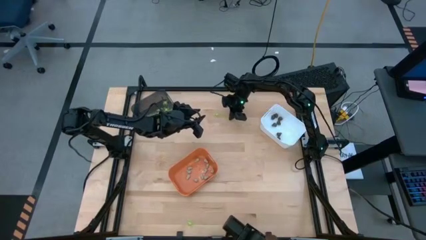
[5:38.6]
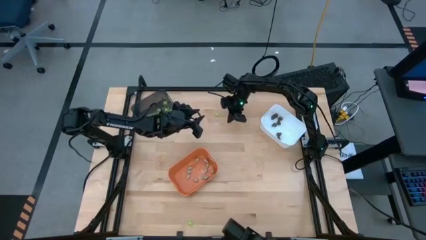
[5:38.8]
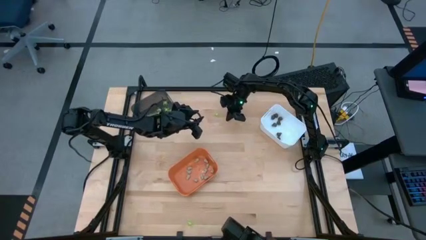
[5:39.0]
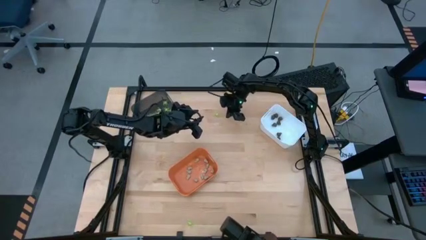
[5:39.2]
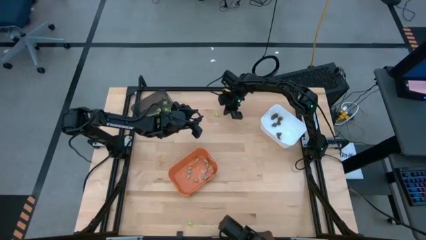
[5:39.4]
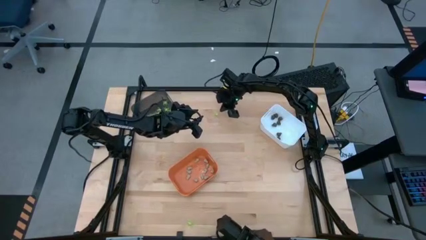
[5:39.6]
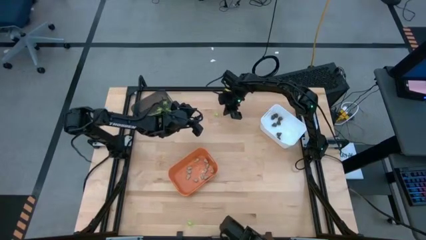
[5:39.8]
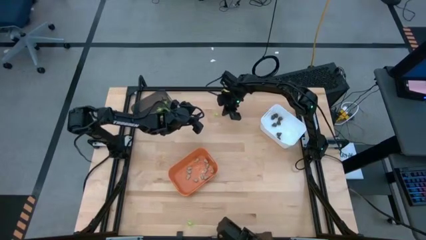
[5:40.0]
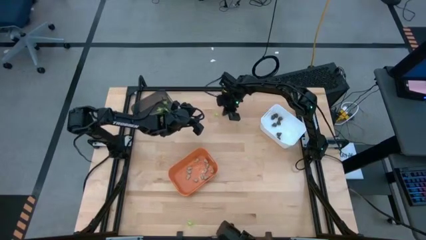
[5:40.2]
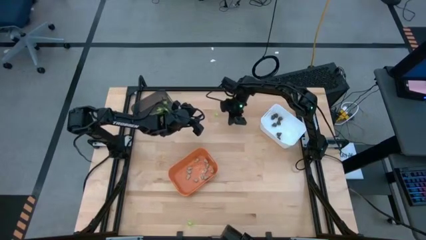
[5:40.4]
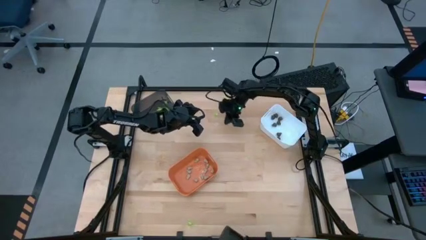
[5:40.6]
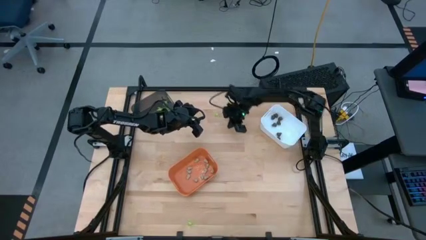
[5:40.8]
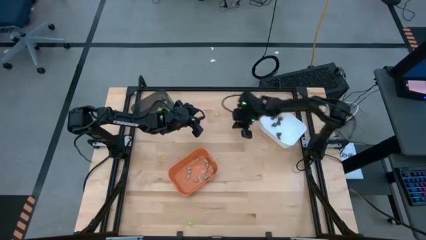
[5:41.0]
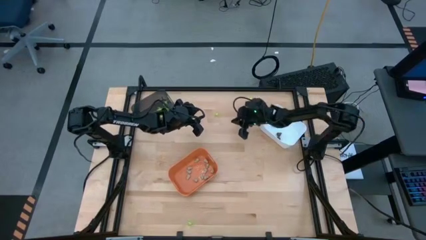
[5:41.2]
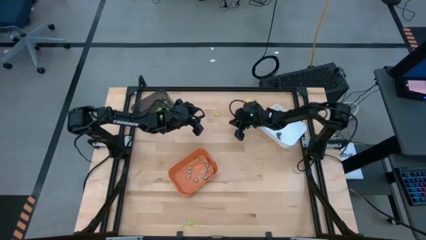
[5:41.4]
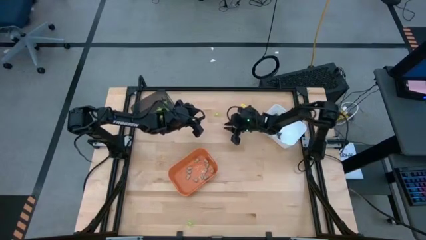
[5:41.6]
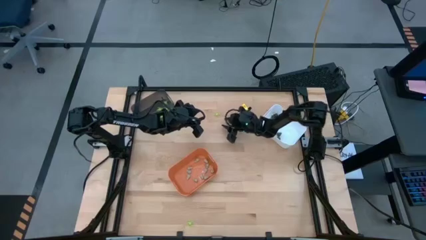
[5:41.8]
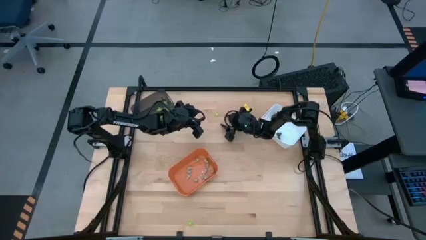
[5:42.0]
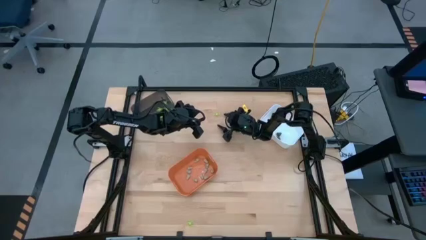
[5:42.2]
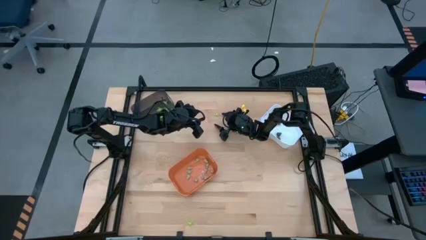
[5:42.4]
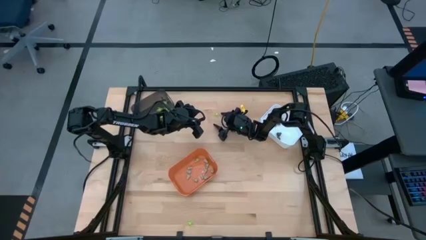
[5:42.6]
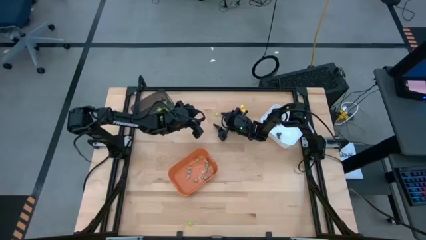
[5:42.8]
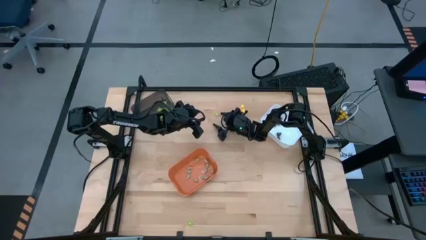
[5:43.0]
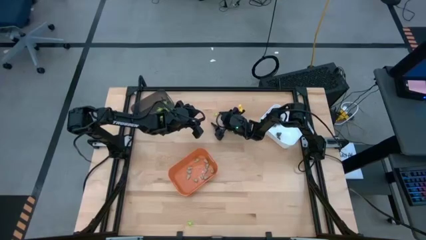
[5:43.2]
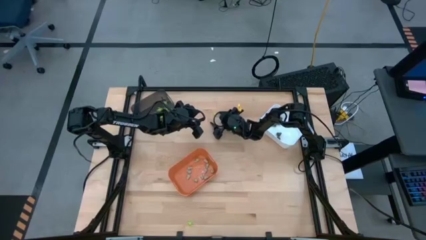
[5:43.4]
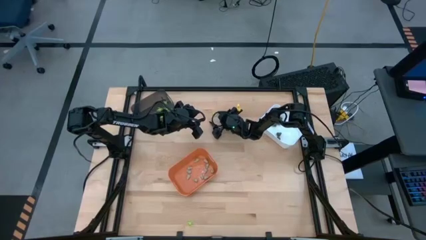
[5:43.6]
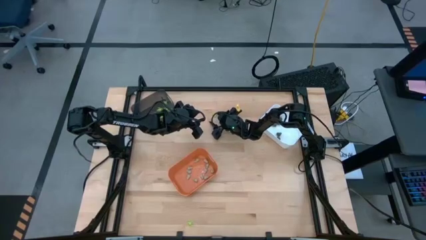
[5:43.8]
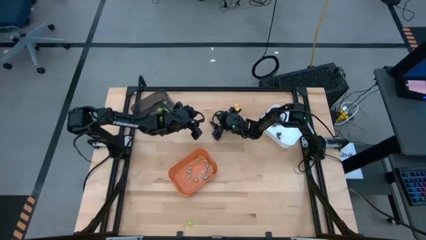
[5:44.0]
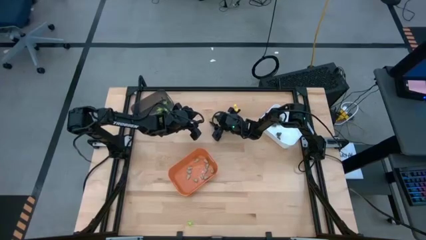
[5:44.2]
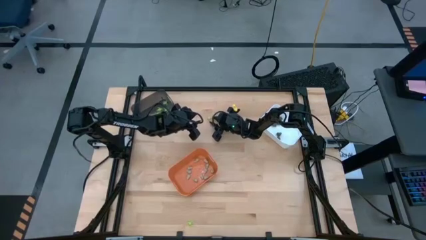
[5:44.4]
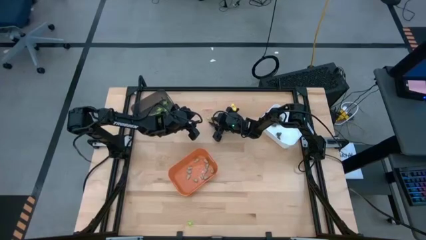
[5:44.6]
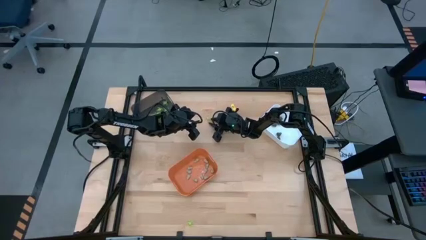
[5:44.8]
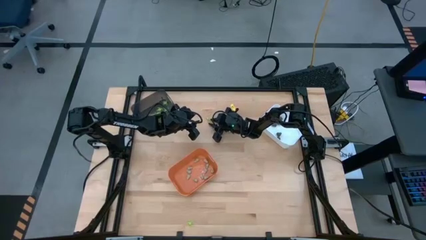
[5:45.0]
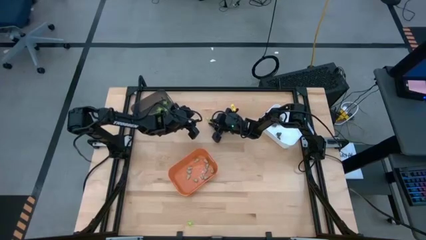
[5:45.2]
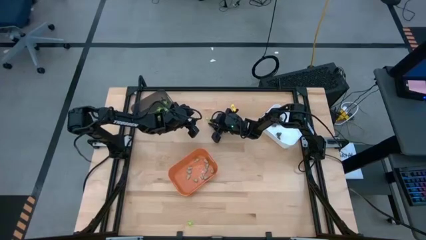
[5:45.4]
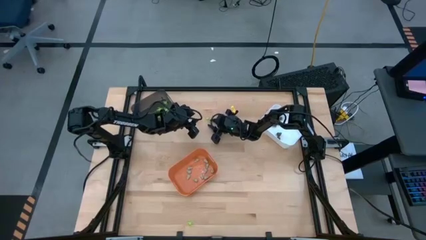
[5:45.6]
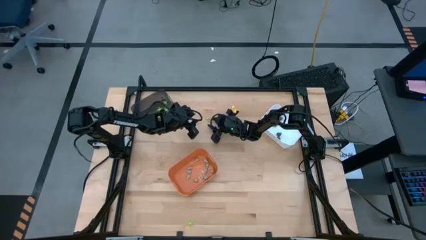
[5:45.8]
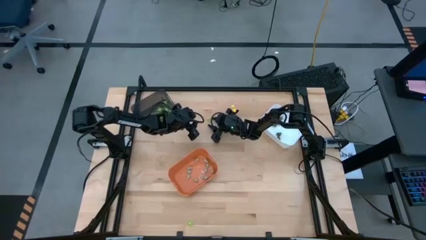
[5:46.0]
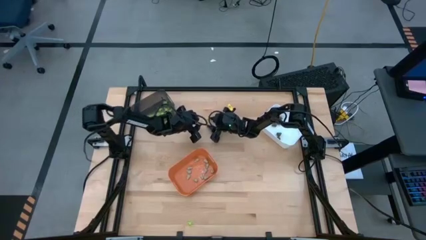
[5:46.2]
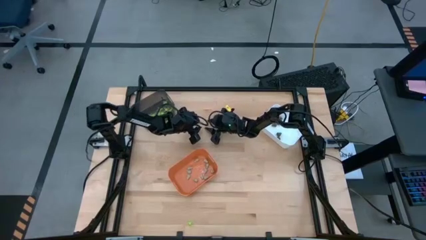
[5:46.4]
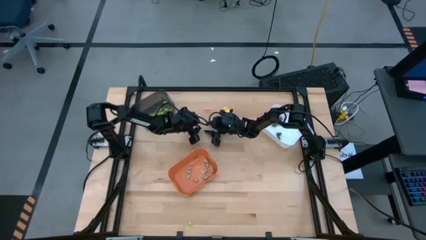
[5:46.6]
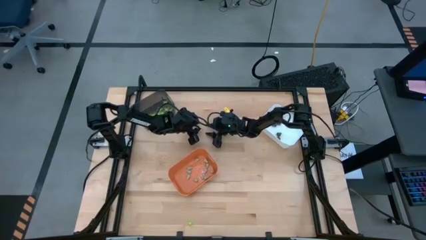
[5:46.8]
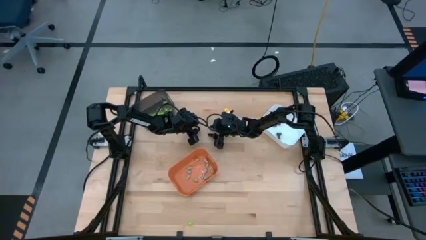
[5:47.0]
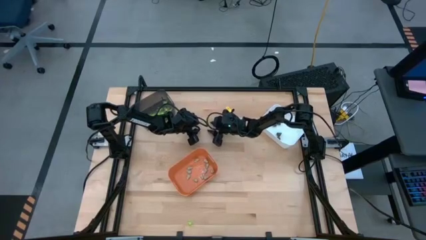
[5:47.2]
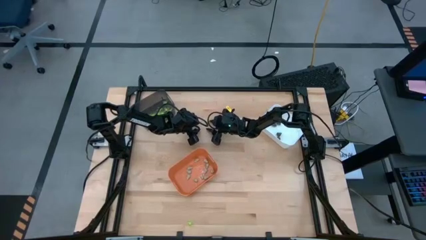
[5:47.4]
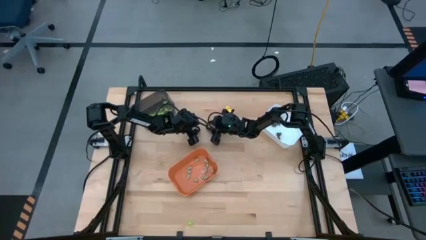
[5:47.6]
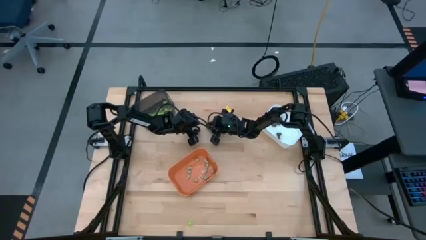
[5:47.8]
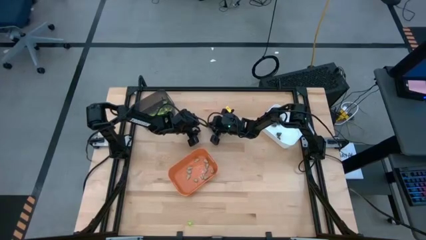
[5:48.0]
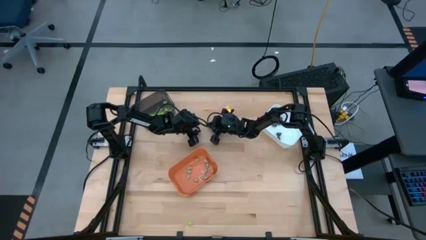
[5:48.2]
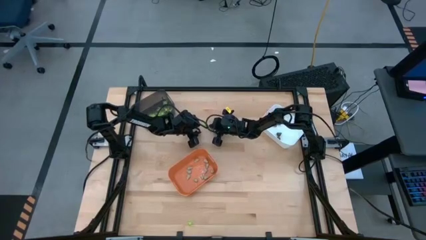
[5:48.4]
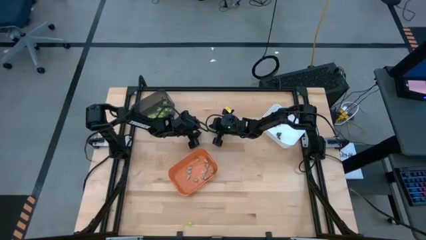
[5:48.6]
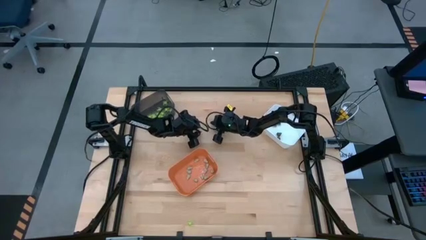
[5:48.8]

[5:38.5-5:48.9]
Task: Sort Halloween decoration
Put the green spider toy into the black bin

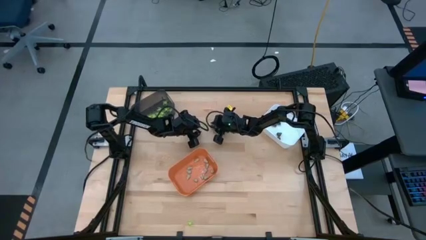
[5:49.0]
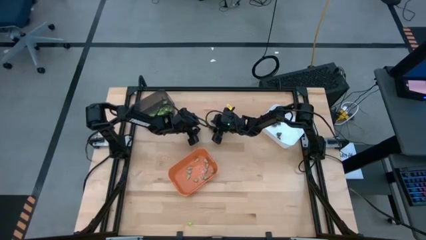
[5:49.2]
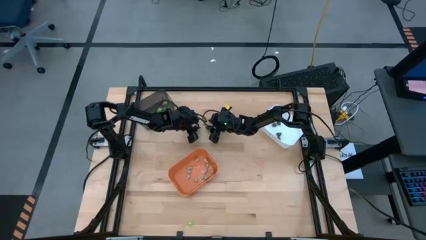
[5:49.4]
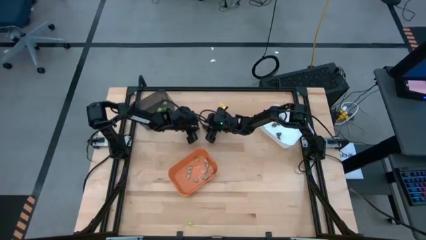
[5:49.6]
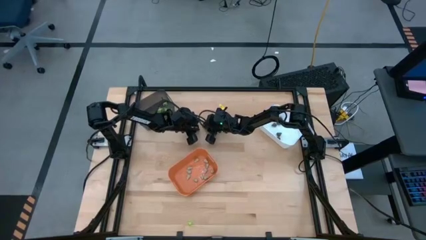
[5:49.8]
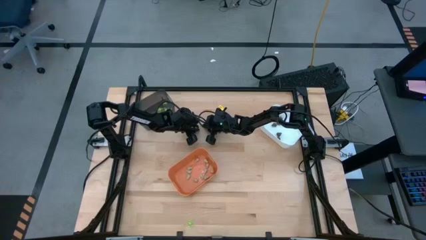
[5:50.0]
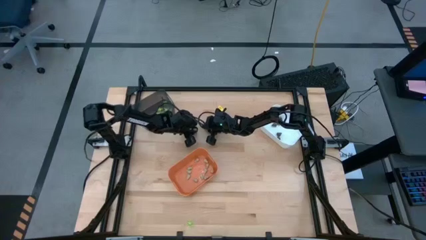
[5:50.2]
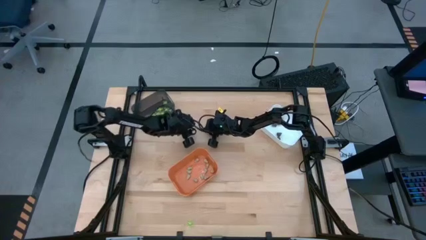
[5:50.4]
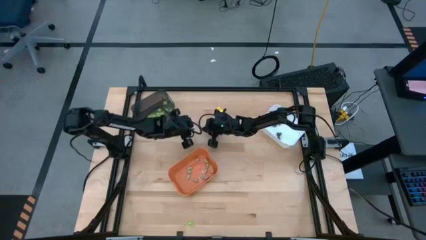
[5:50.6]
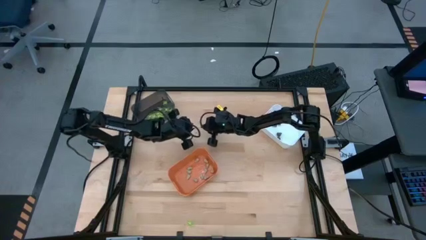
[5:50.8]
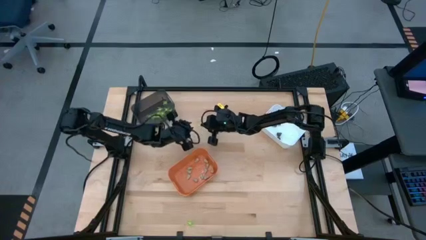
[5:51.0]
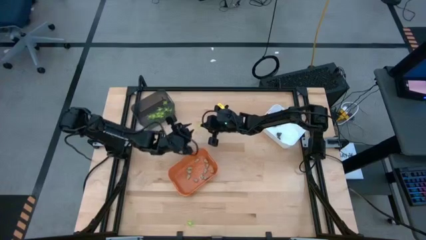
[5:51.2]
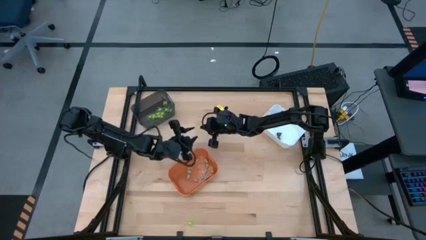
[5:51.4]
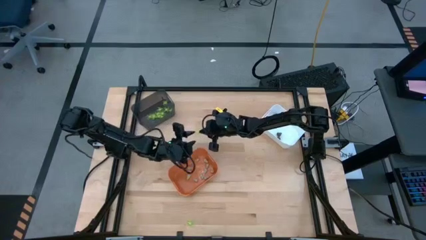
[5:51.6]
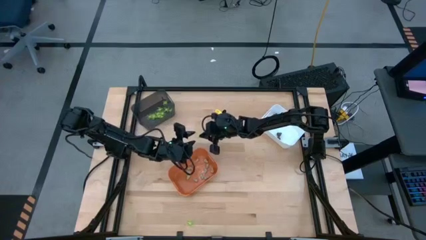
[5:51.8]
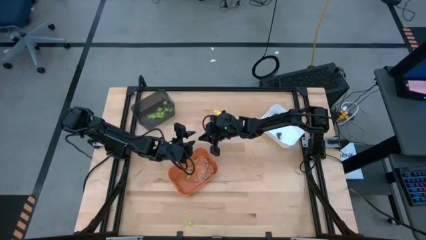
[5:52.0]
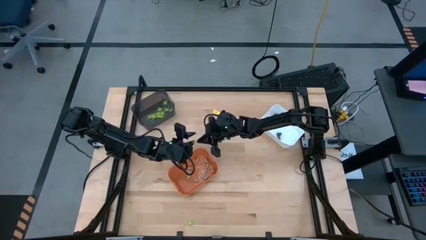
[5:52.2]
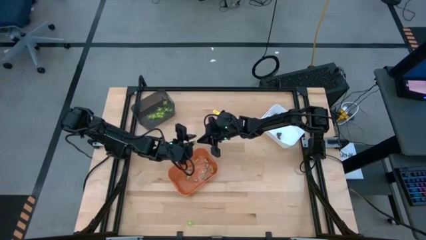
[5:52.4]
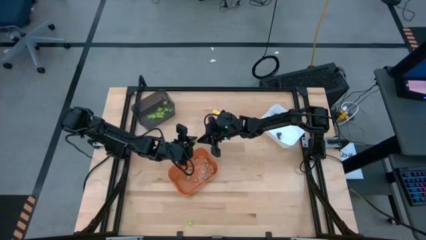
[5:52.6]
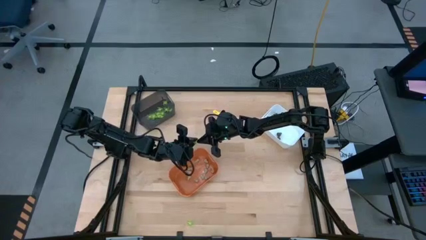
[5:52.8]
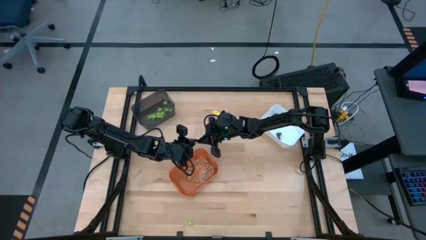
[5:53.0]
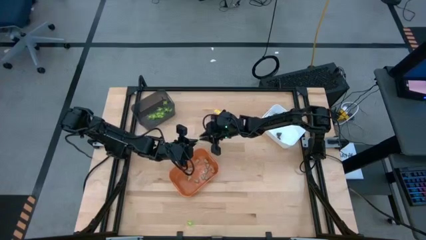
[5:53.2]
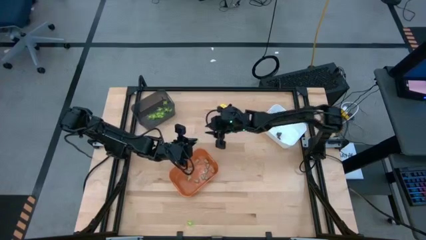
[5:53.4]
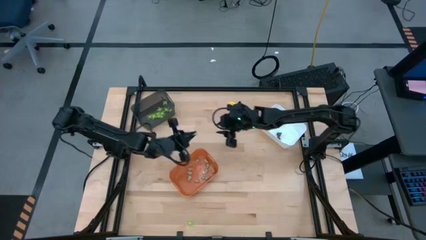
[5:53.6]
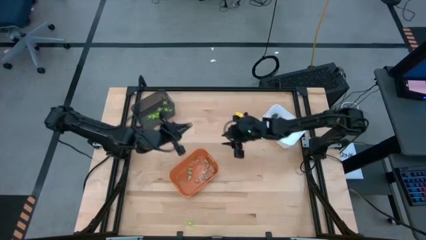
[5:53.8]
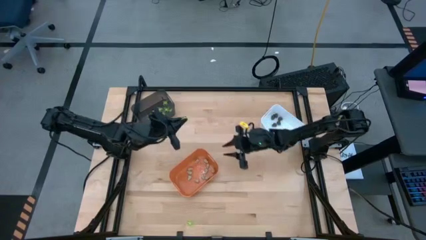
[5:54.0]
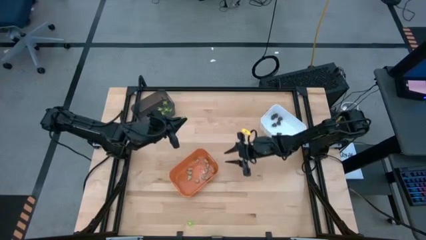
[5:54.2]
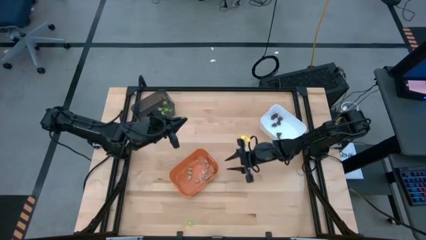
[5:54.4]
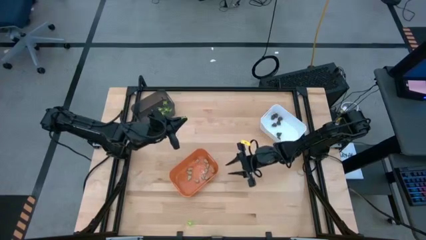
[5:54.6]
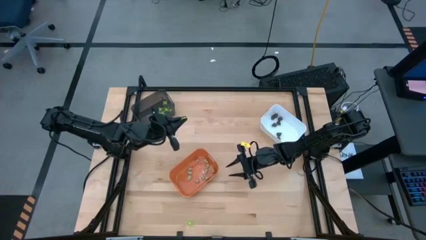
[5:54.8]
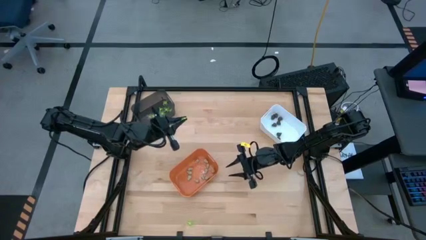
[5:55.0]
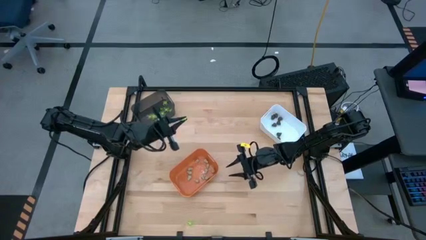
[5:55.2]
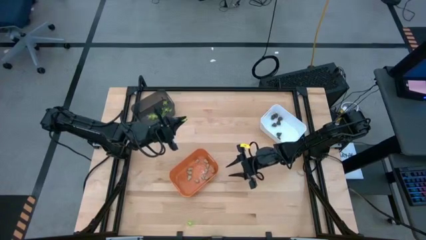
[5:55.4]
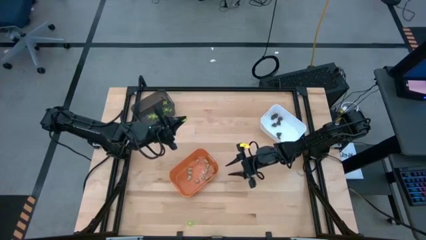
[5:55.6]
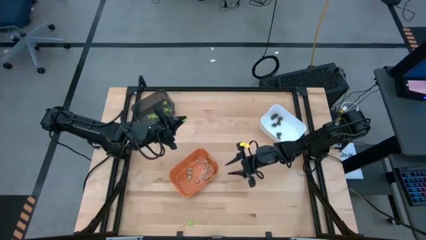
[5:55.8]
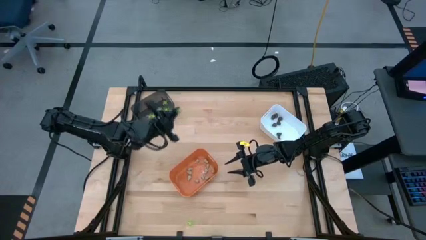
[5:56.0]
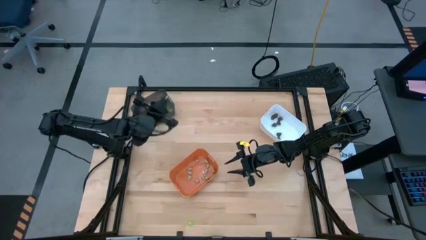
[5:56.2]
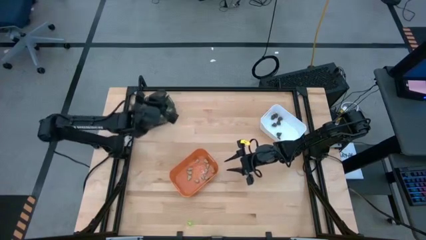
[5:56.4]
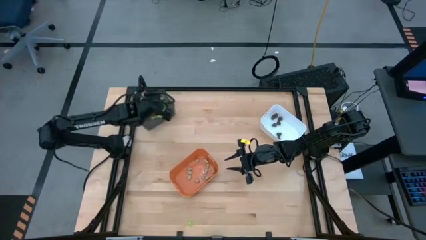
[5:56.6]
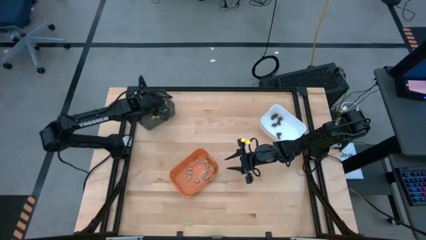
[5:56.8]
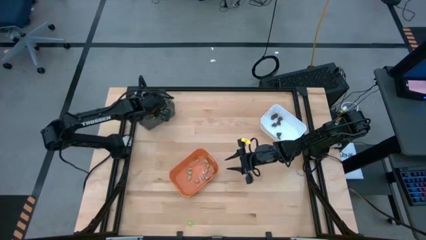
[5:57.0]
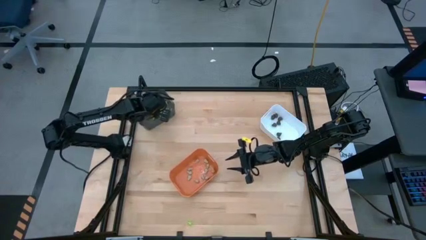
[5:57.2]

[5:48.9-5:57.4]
Put the green spider toy into the black bin
